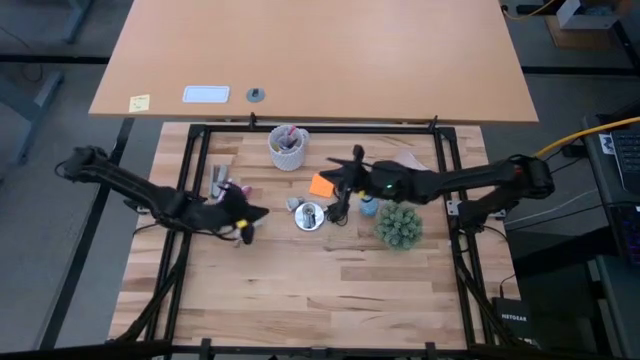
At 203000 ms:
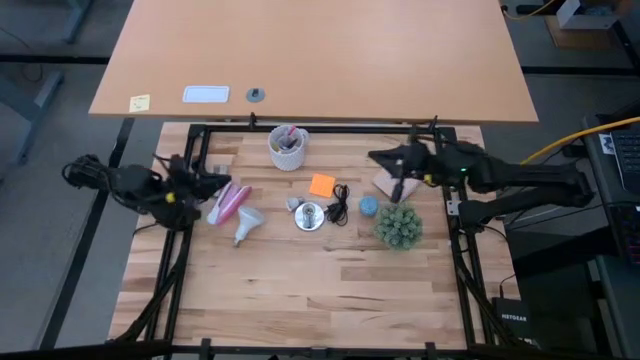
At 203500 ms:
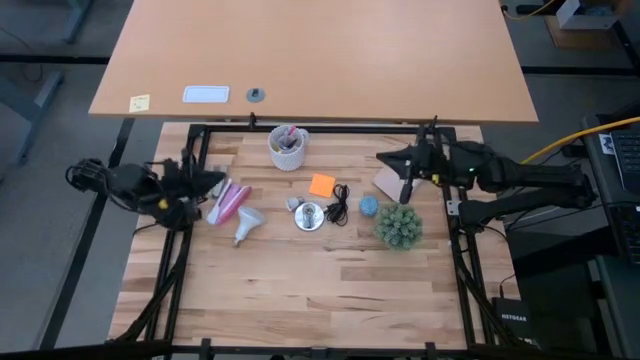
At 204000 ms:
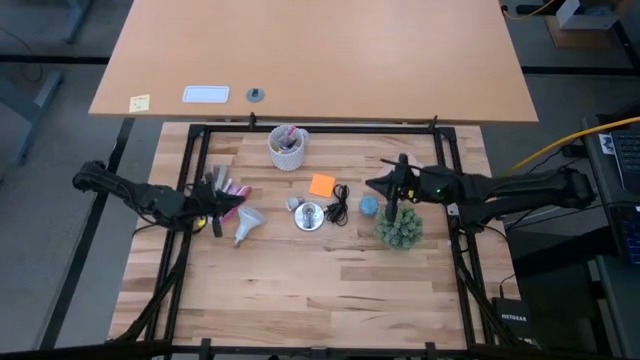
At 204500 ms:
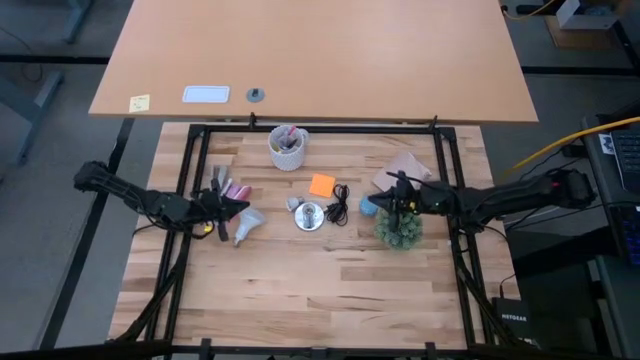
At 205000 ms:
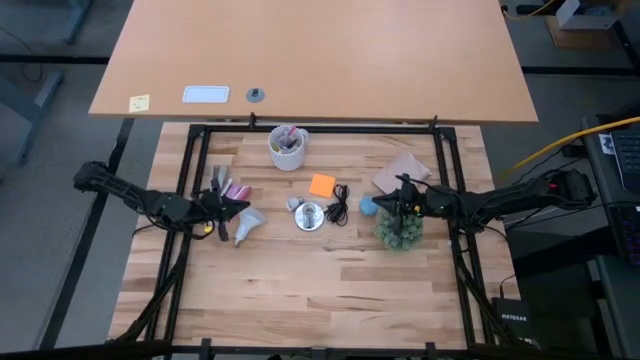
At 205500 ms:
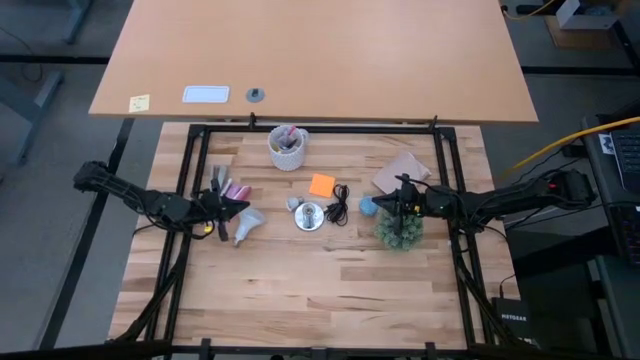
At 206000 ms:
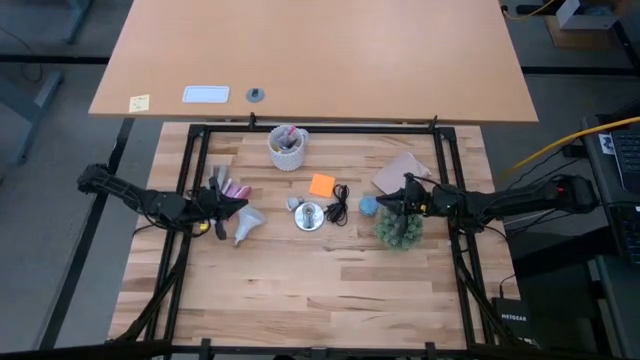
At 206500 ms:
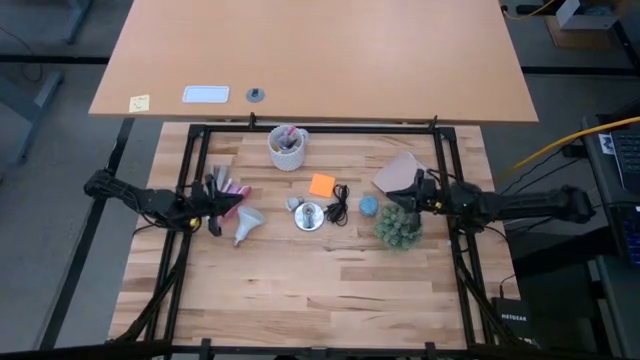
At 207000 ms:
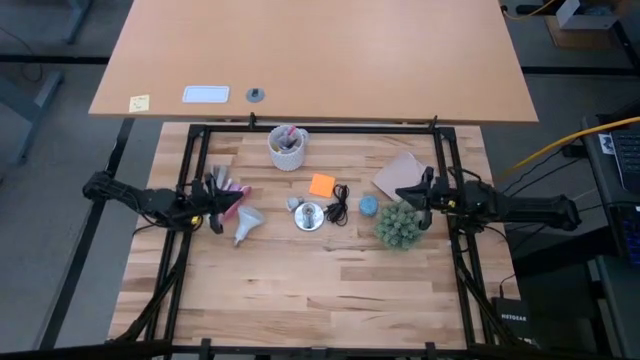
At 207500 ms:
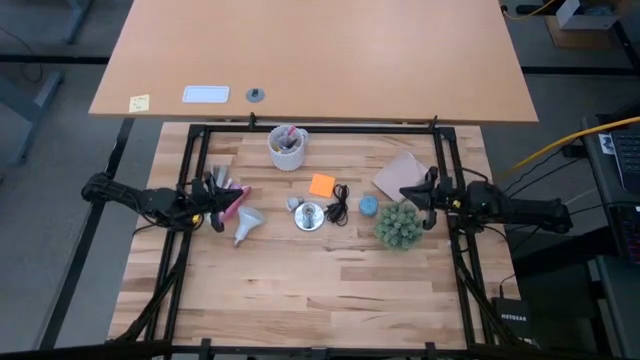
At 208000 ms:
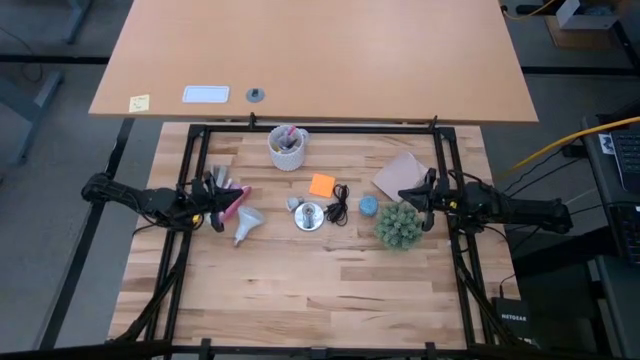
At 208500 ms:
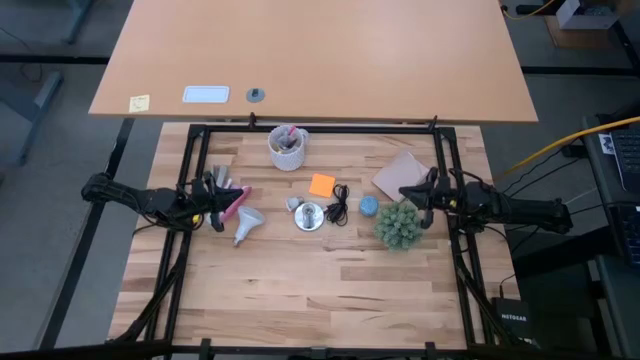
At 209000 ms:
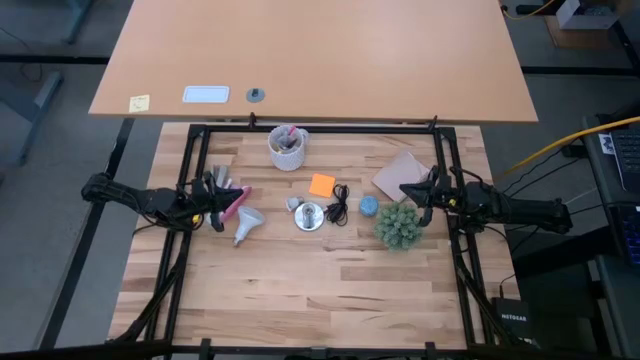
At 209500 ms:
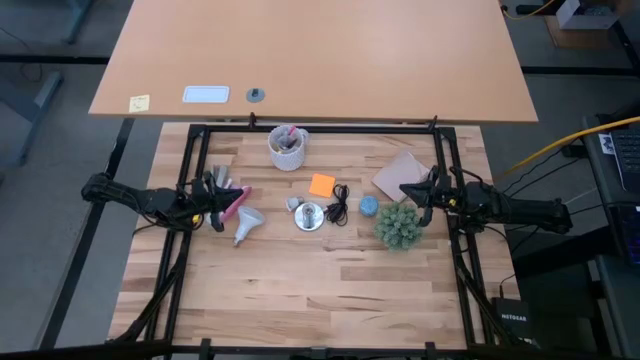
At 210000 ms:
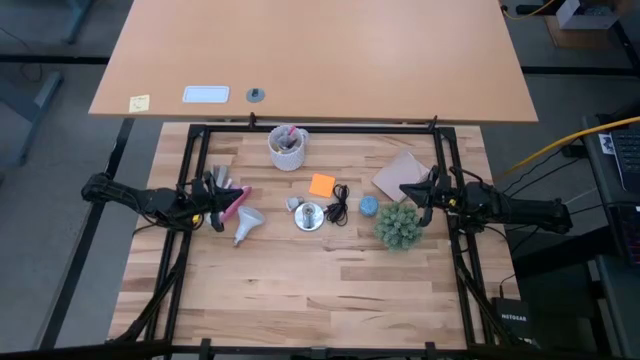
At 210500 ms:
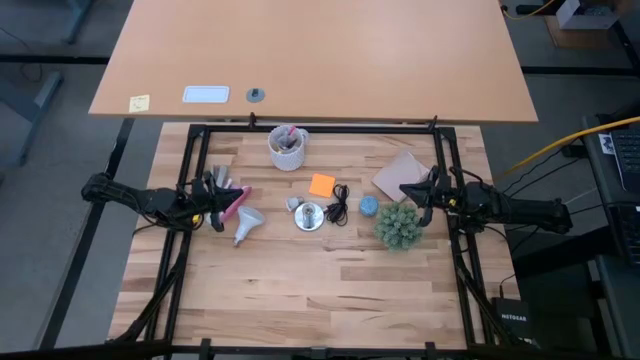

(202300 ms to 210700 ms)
Task: Screw lightbulb
Return to Home Position

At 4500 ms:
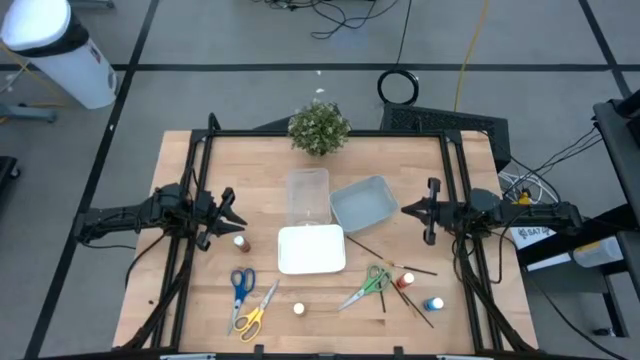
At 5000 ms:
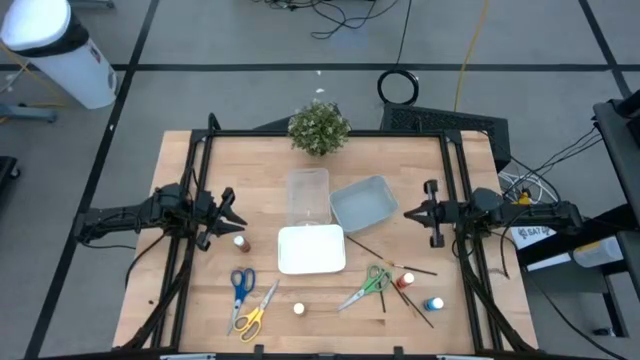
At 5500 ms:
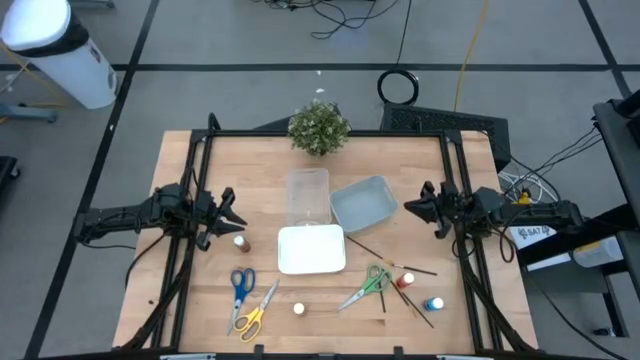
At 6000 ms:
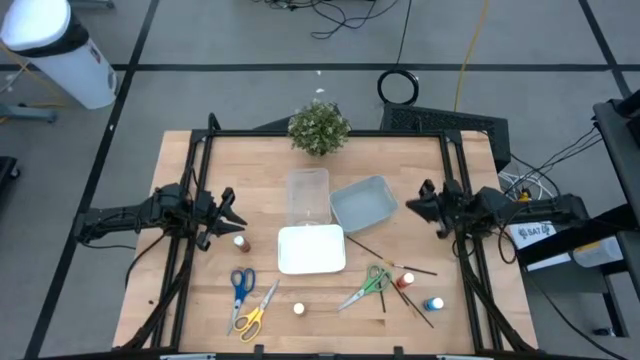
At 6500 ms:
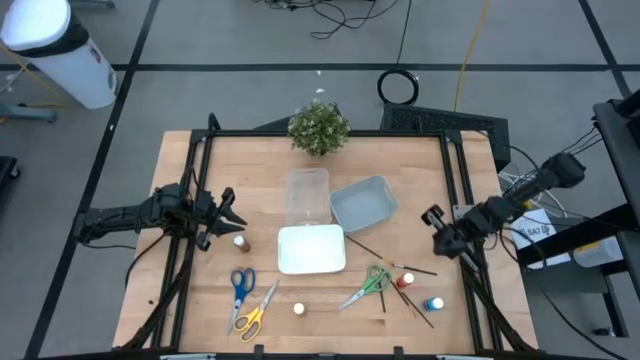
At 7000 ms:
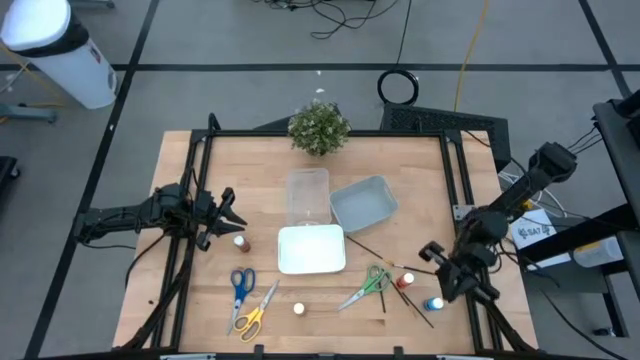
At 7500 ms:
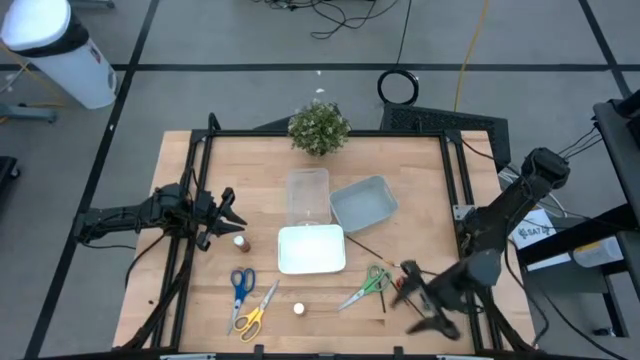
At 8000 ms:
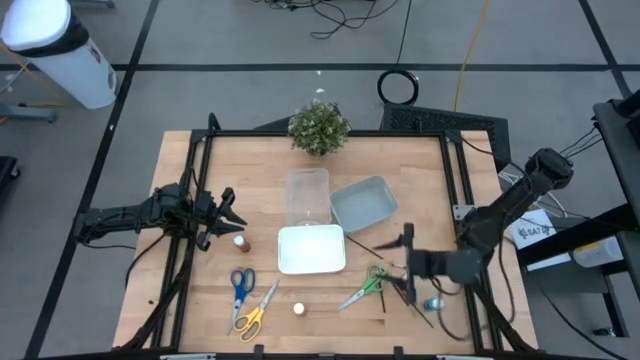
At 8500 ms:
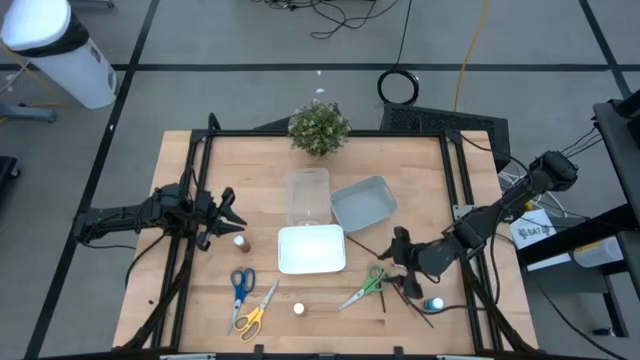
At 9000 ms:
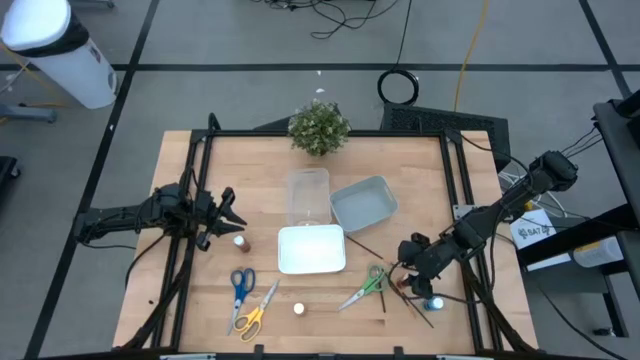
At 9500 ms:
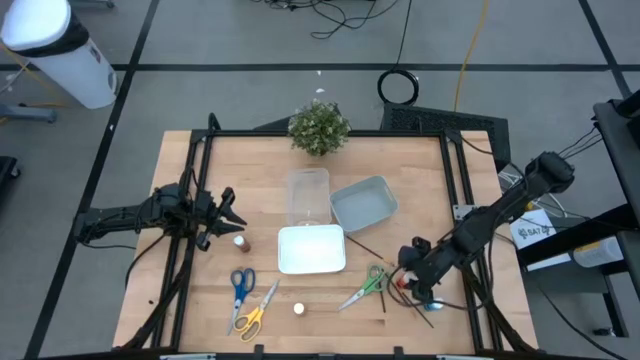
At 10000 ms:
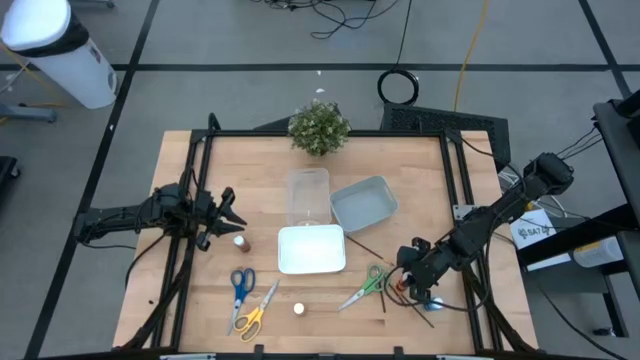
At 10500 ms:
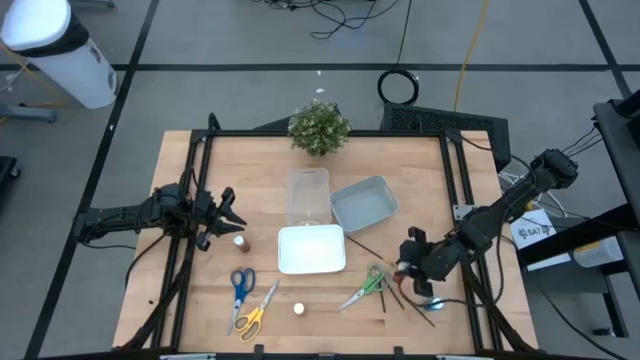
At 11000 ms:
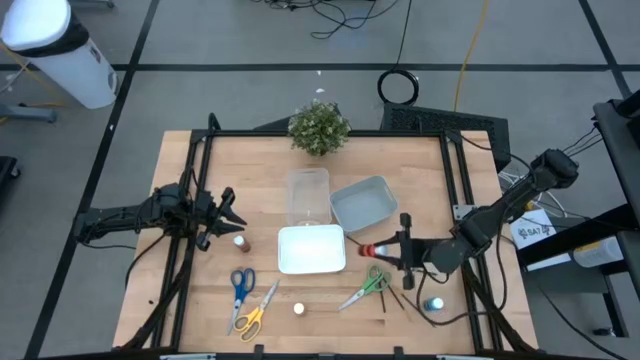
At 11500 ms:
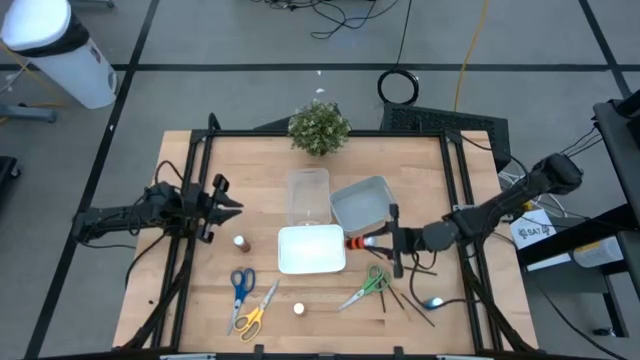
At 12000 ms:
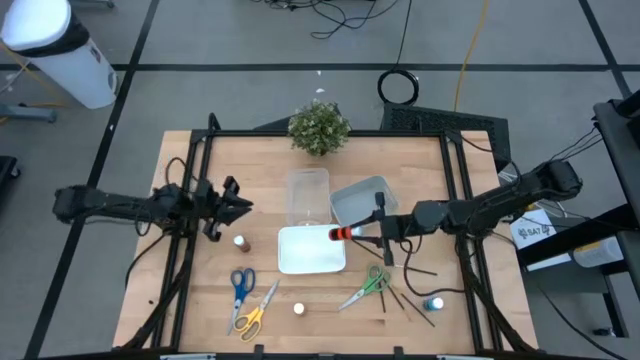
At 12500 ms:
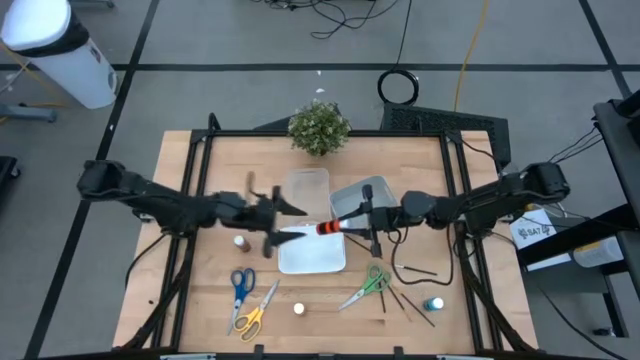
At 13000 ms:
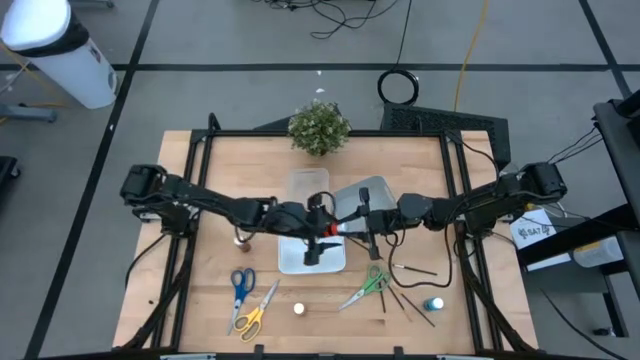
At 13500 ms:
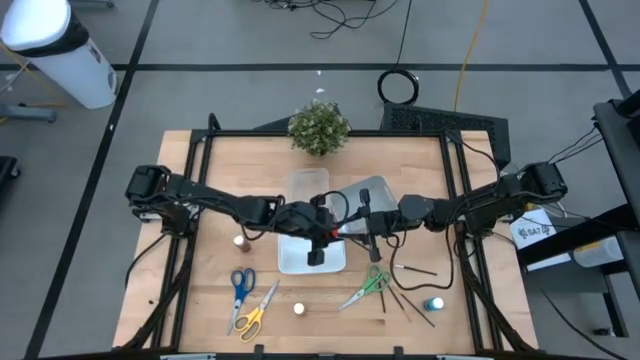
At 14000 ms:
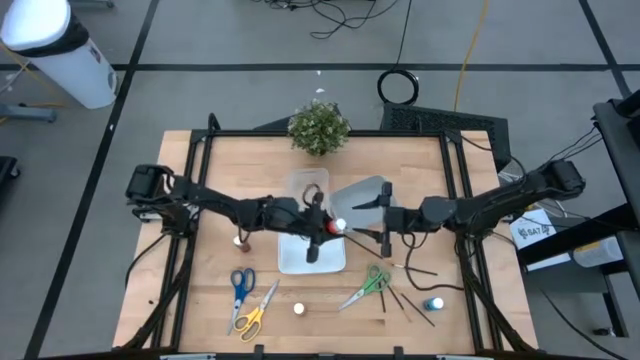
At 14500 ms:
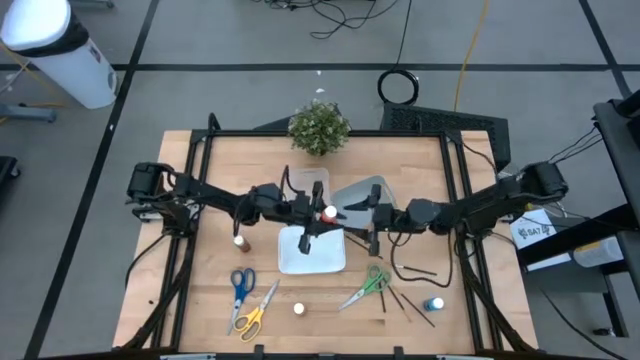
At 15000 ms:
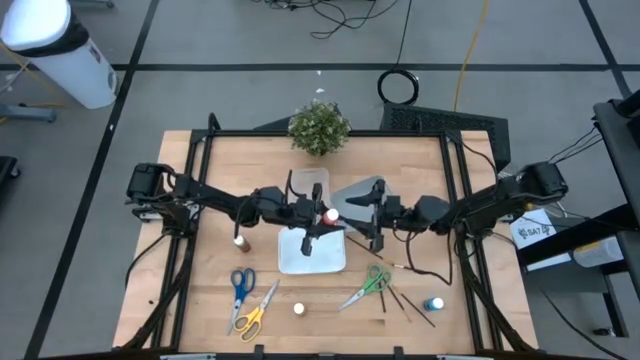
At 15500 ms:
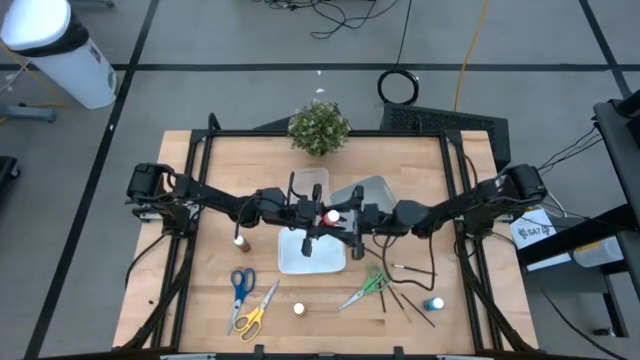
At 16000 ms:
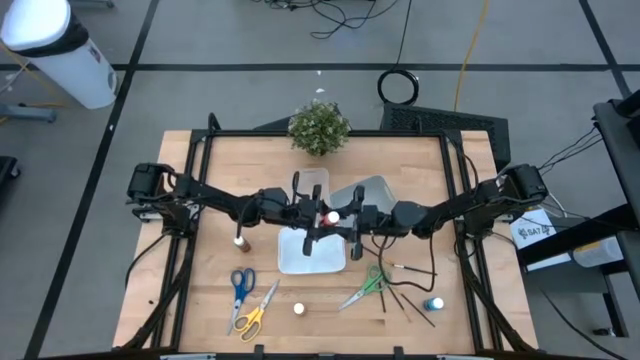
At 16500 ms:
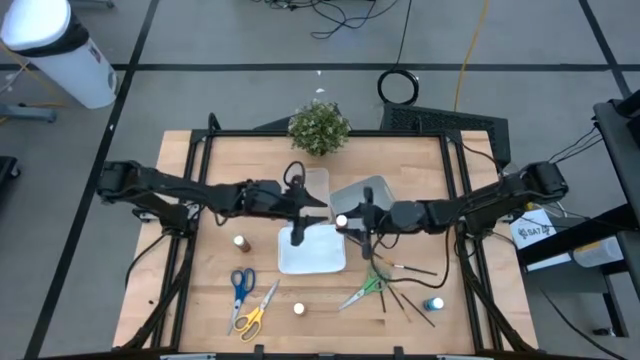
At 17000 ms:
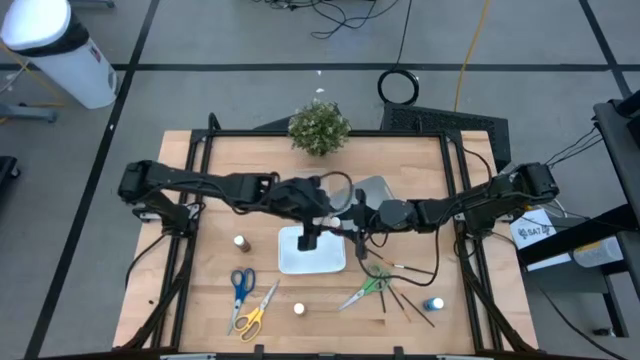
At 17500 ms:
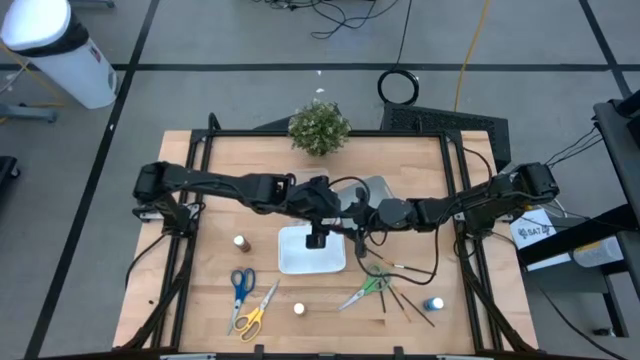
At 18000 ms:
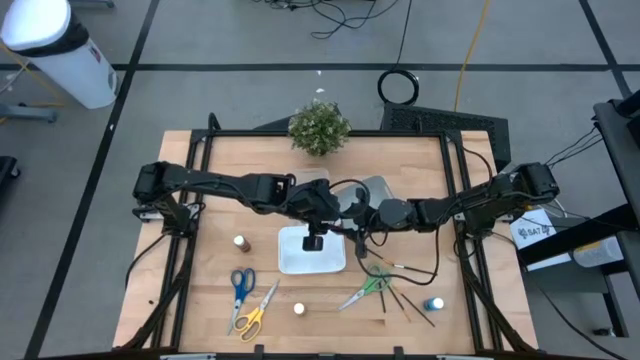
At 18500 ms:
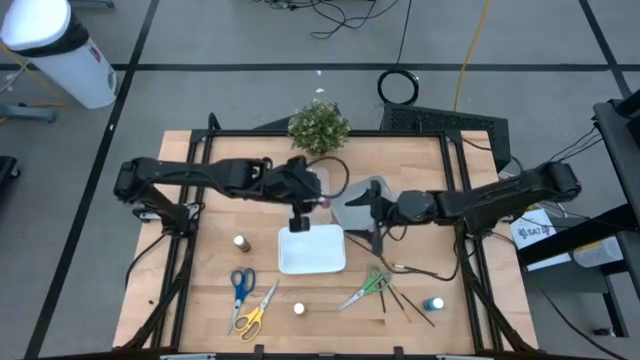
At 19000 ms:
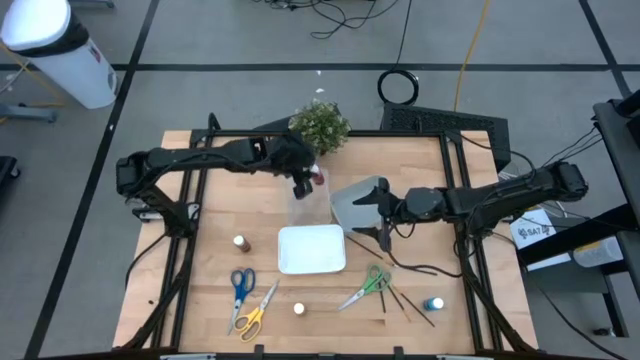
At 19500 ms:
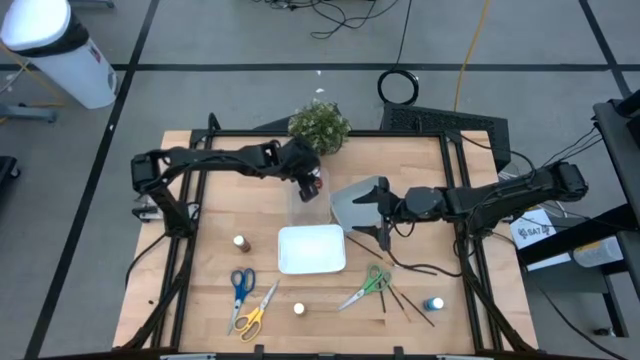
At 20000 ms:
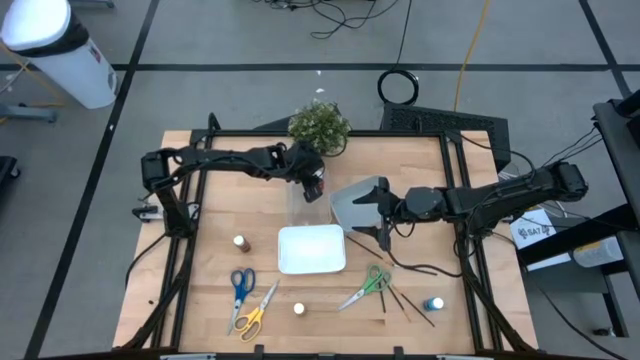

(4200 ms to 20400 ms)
Task: Pick & Place Paint Supplies
Put the orange paint bottle into the transparent bin
